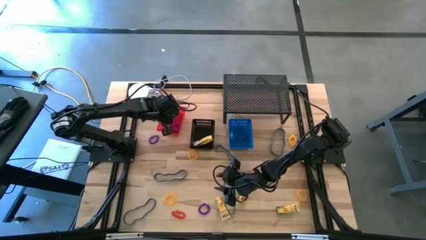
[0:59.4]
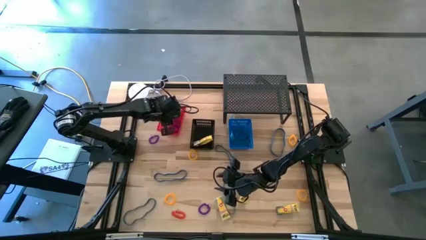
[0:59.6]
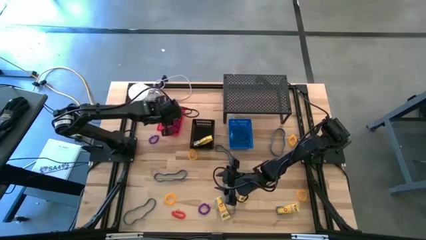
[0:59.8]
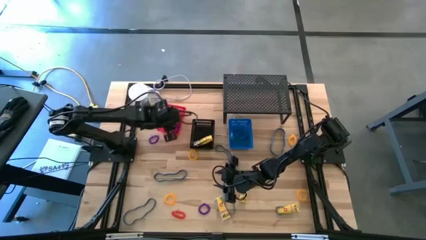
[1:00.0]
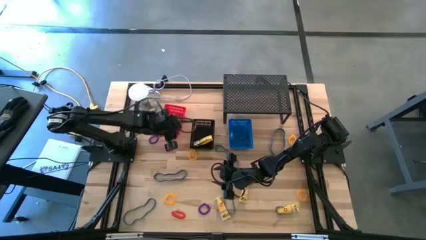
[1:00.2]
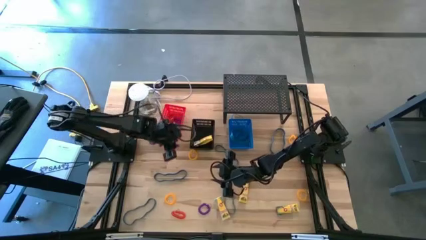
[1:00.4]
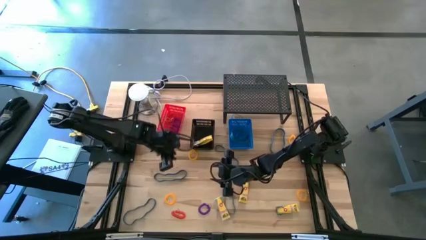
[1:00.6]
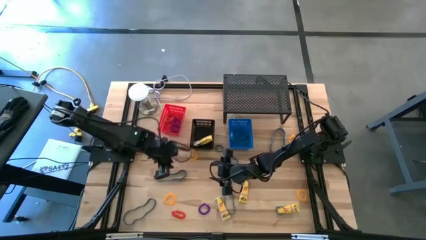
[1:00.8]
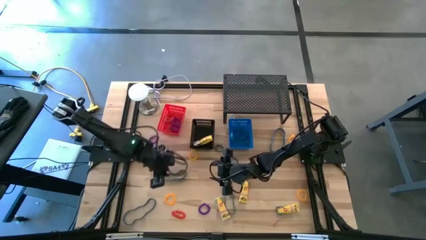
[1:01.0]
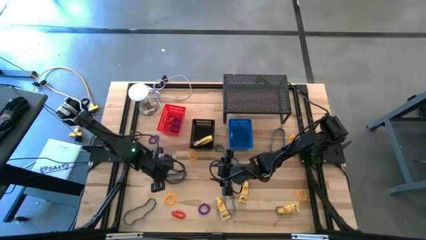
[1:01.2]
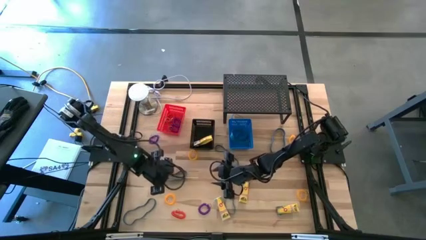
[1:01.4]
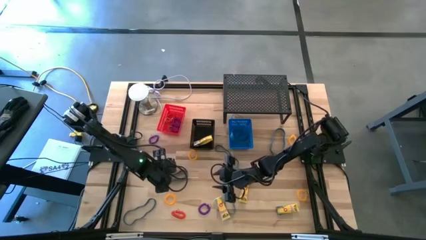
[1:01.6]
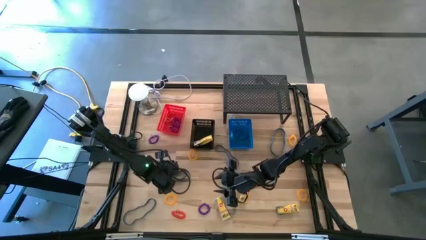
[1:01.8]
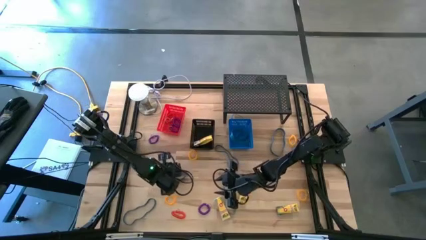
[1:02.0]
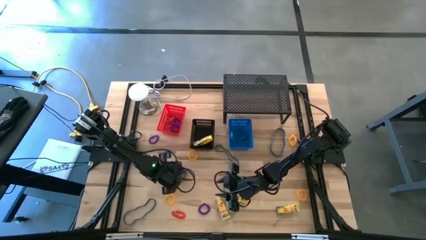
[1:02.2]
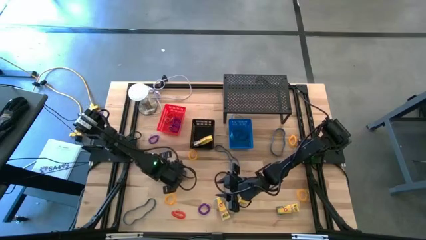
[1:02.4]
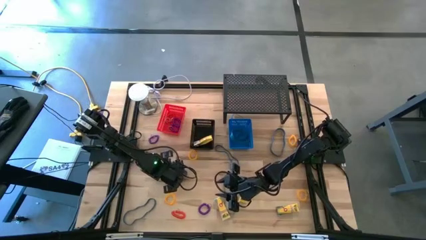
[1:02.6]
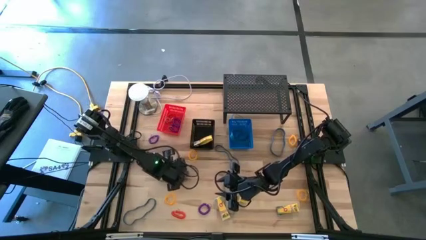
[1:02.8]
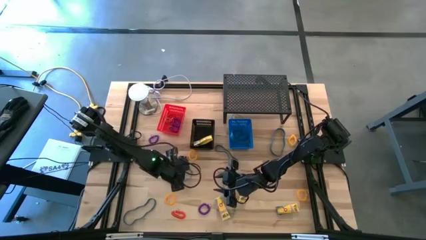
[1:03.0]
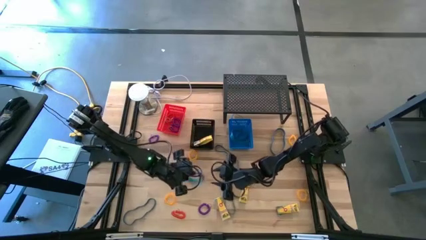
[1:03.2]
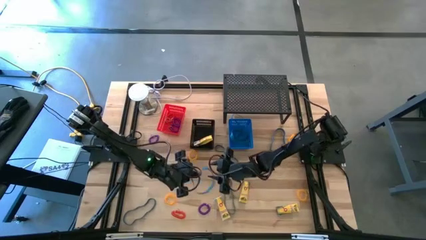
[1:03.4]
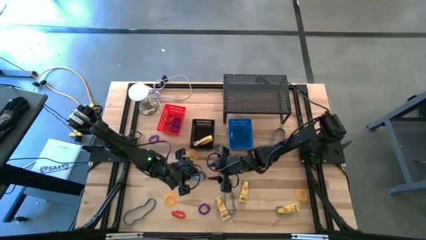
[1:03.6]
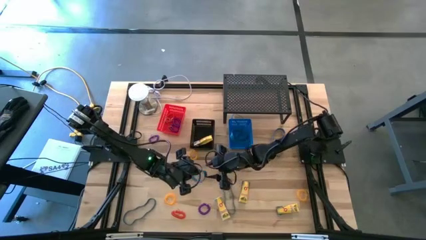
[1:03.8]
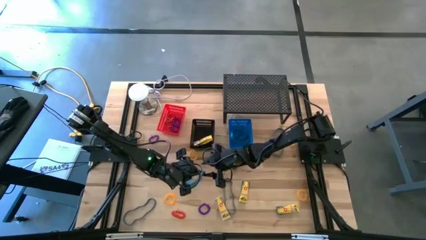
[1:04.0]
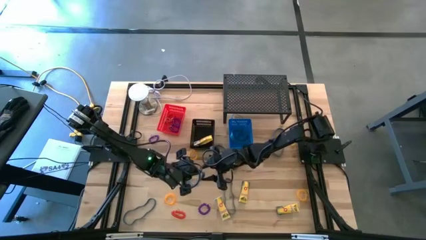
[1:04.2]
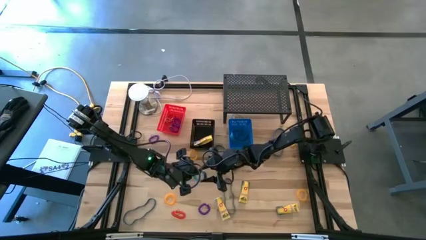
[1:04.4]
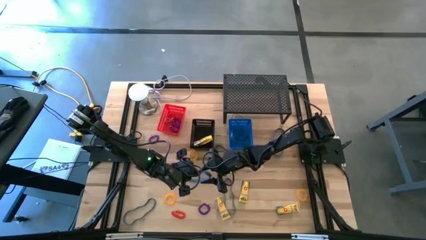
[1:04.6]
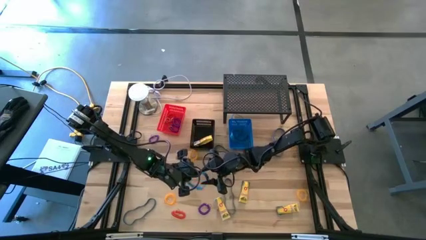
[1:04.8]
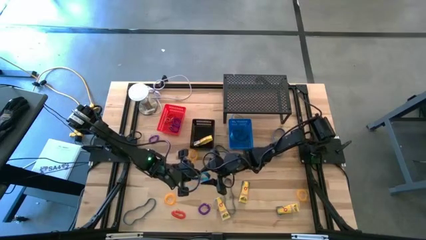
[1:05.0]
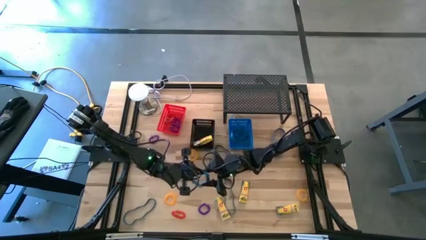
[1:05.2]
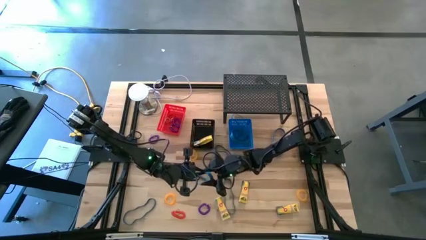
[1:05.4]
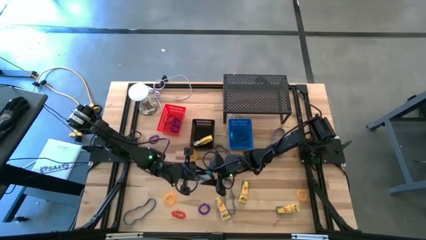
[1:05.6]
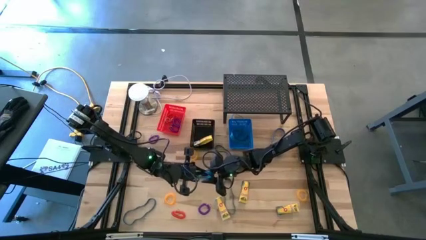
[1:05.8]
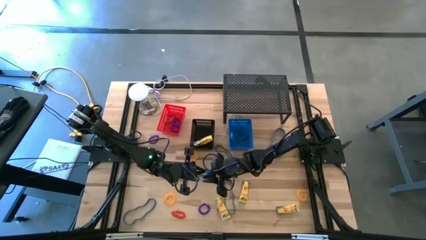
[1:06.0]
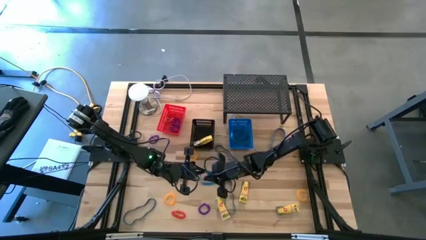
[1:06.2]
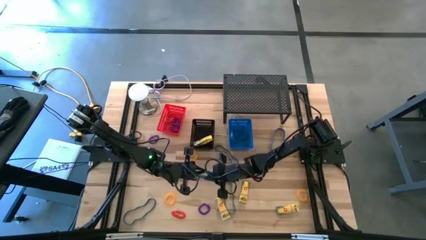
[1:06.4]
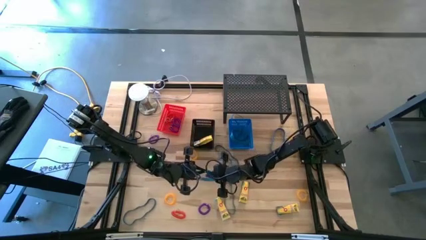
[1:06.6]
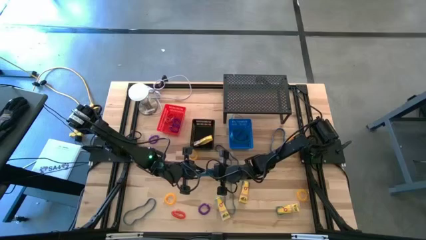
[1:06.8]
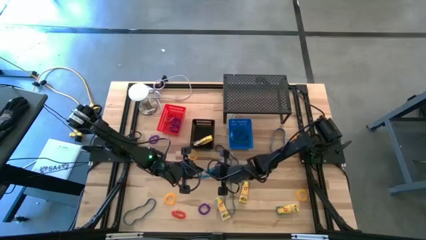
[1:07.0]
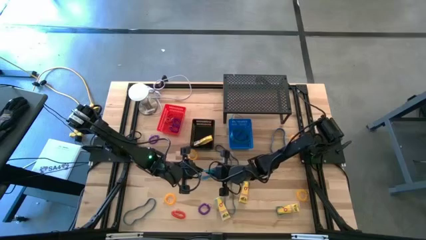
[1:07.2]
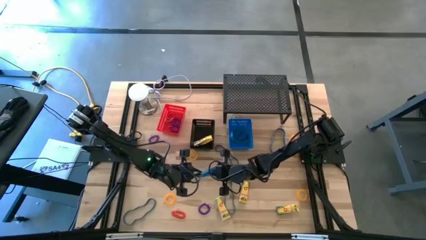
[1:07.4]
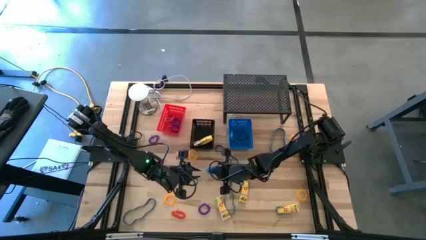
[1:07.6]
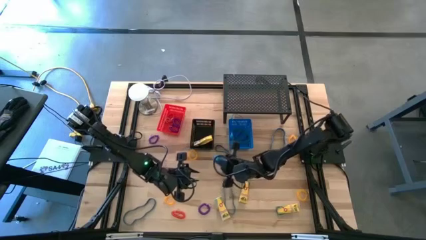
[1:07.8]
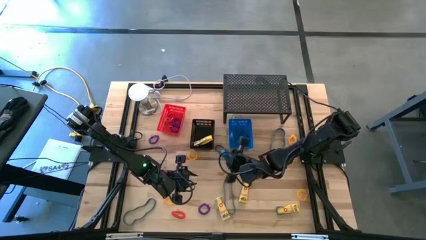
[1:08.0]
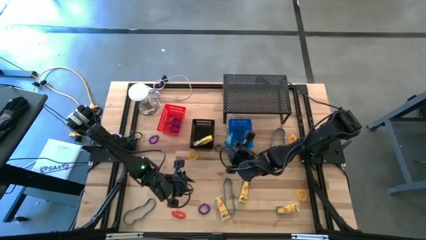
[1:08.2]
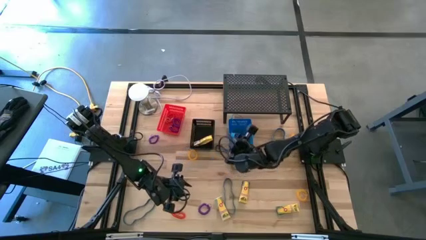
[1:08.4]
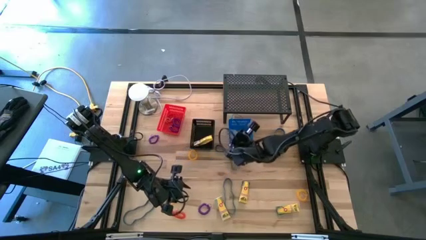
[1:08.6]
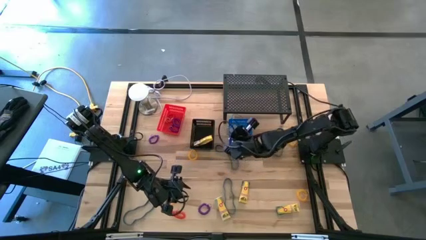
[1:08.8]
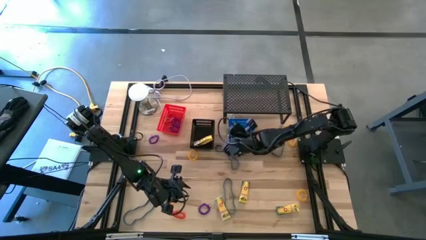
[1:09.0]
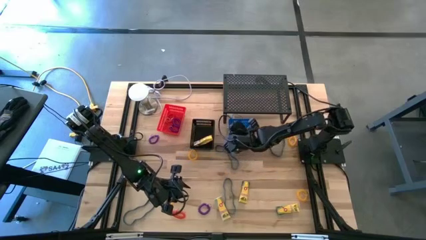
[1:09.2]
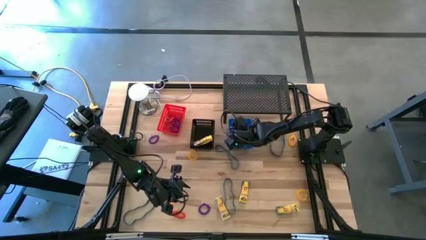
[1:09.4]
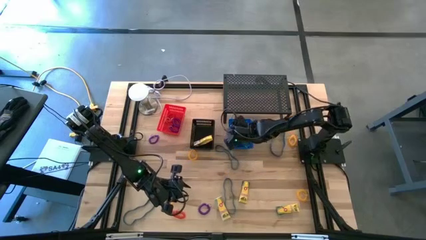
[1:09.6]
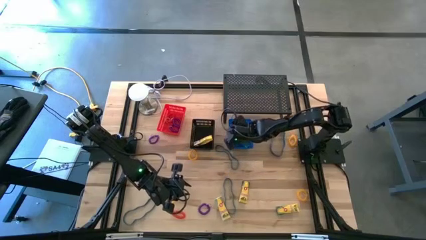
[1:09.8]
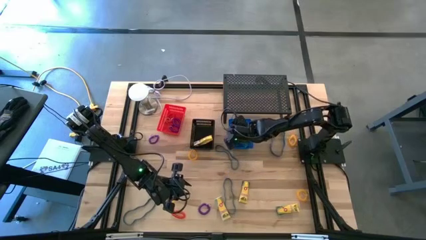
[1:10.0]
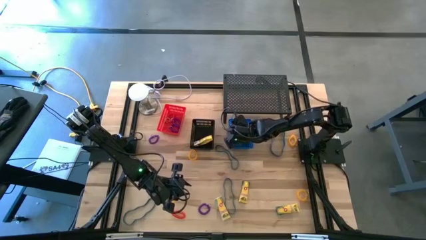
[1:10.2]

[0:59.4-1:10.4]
Task: Pick & Place Office Desk Supplies
Put the blue rubber band into the blue bin

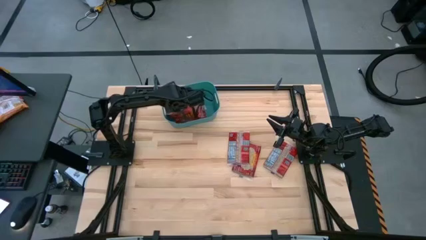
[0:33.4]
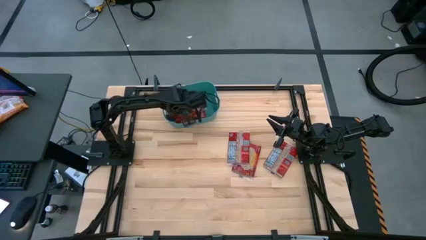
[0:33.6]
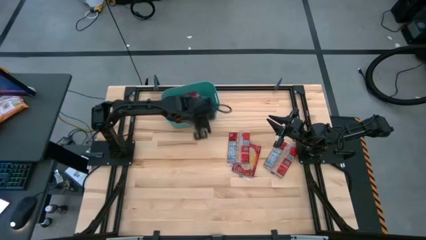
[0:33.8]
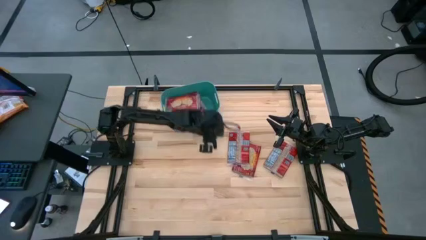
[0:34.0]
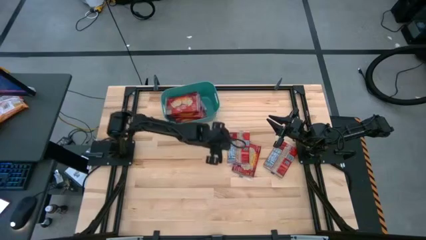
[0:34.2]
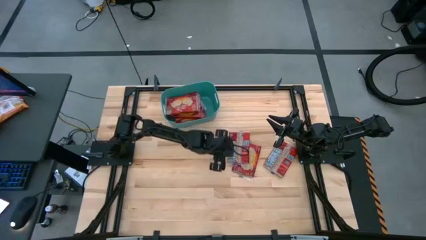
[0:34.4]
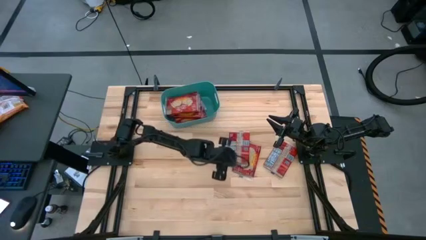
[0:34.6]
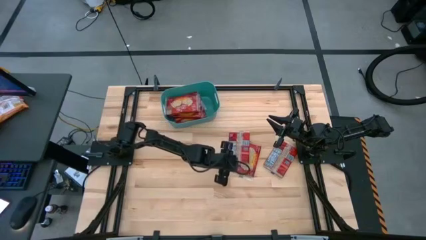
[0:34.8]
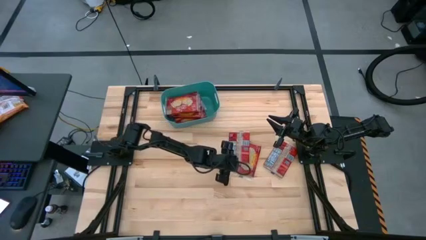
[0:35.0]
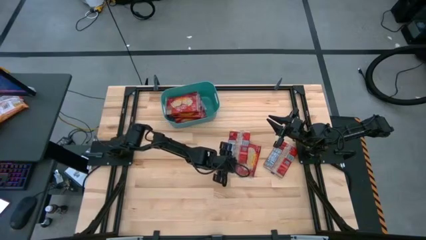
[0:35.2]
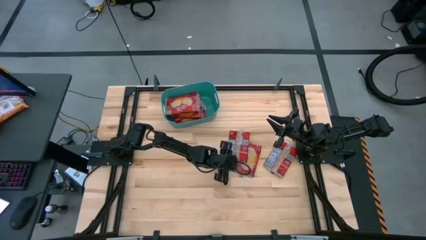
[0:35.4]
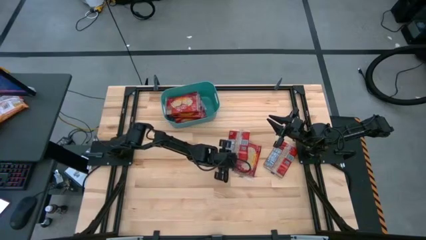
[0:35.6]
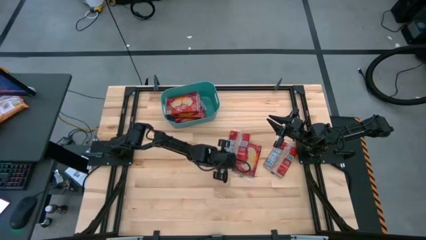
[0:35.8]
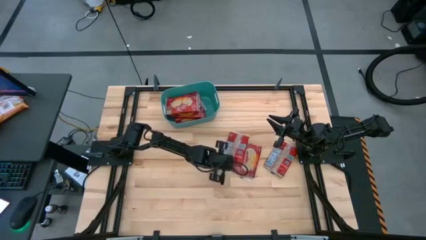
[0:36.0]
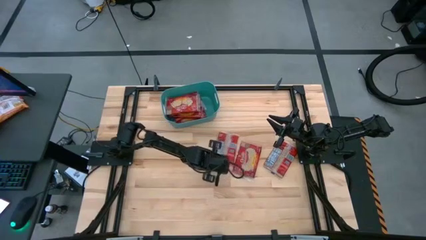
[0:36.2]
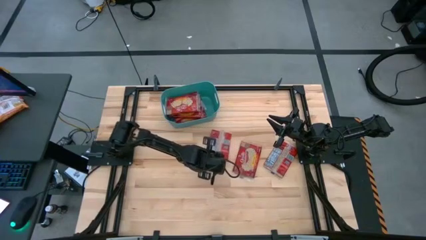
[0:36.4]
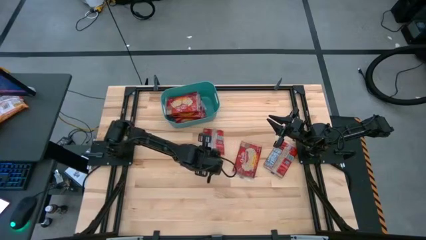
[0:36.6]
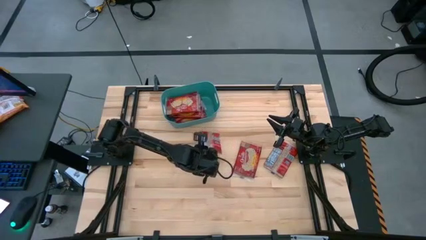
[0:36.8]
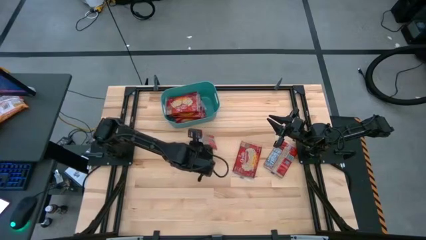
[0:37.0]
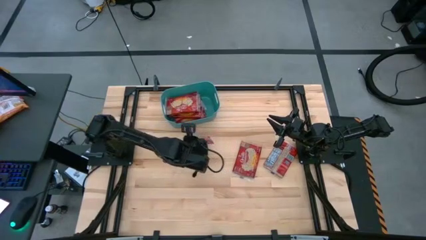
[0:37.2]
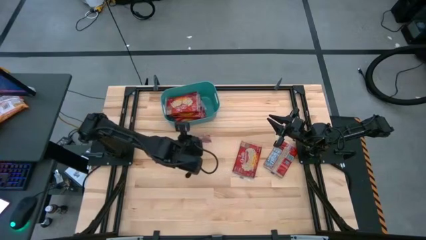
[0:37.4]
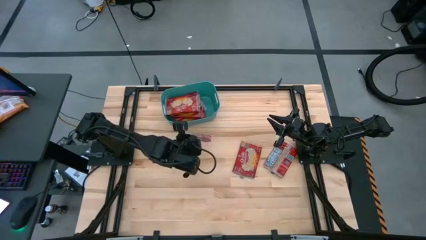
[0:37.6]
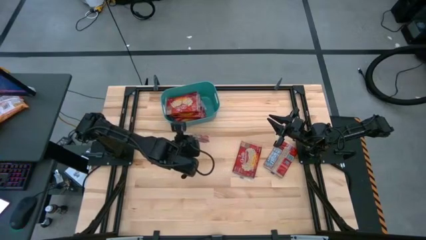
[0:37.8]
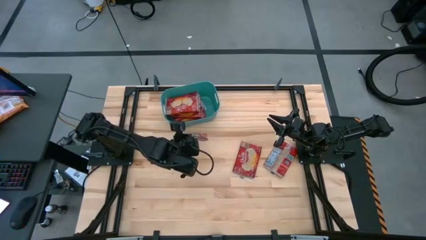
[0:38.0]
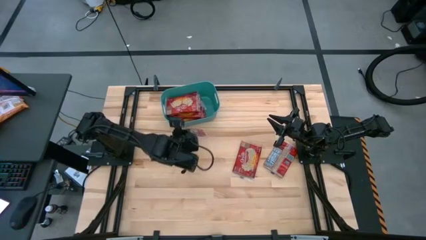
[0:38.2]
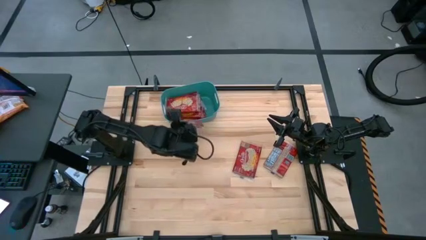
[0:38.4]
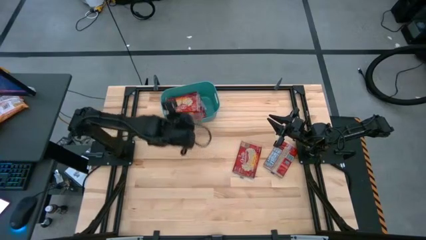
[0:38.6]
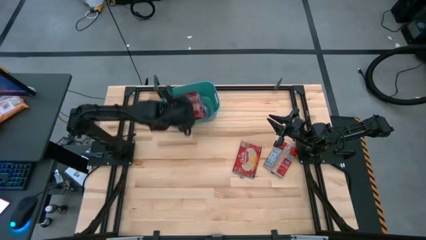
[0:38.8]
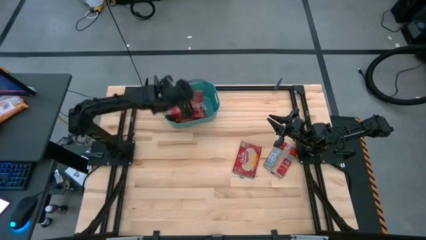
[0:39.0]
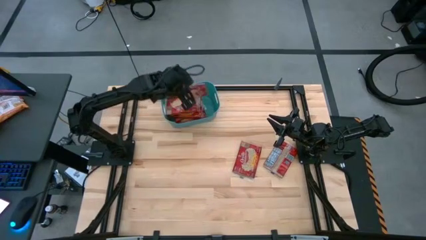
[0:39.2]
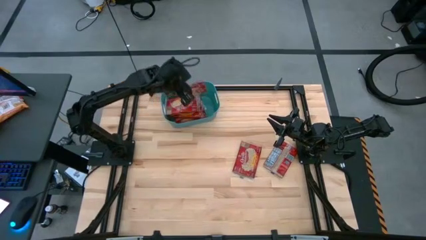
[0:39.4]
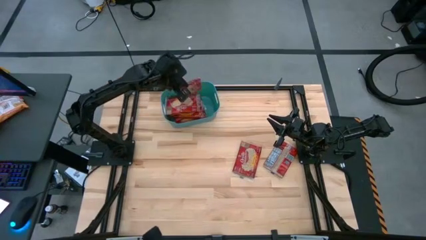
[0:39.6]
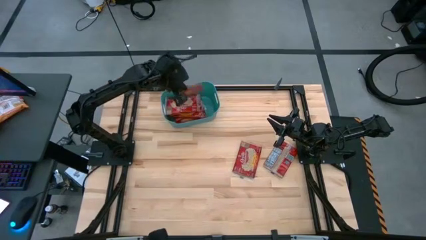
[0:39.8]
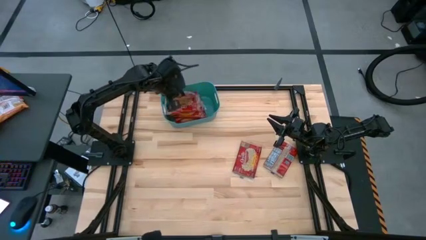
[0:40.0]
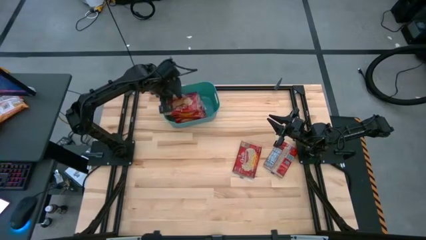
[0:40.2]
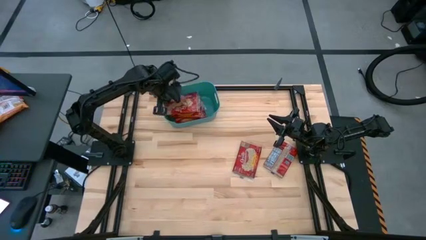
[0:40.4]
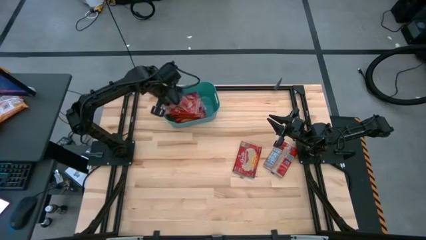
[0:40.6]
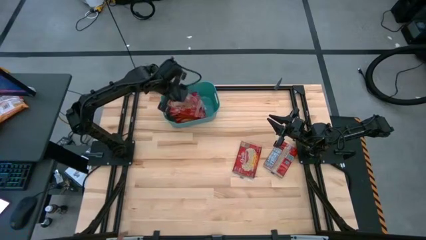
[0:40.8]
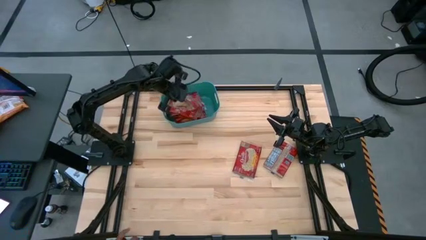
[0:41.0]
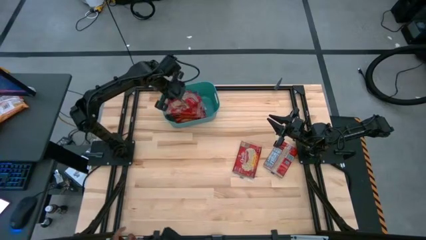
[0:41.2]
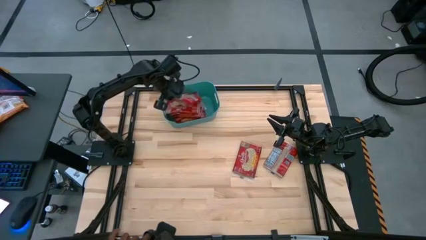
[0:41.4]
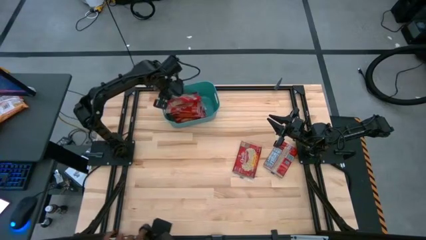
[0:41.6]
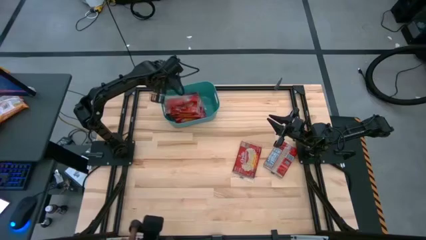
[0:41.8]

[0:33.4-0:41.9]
Task: Sort popcorn bags into baskets
Stack the popcorn bag into the green bin
